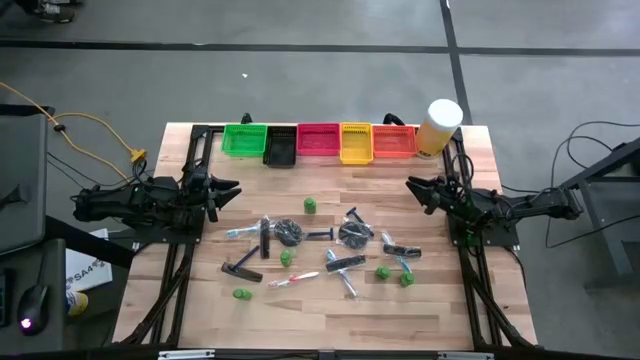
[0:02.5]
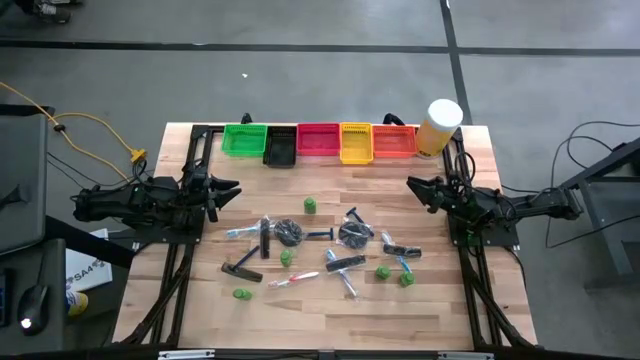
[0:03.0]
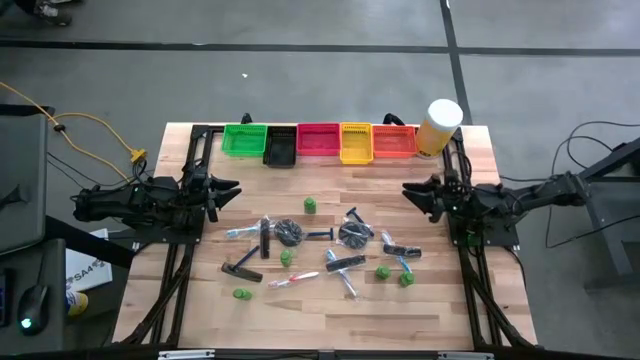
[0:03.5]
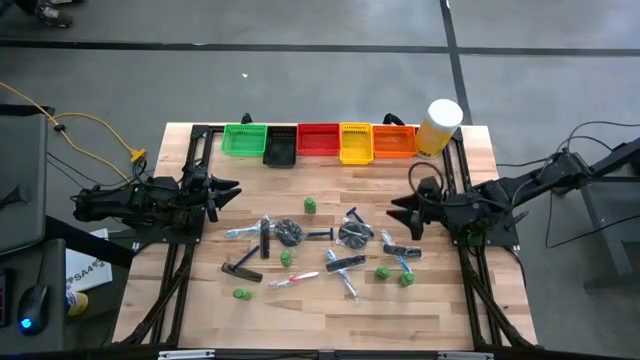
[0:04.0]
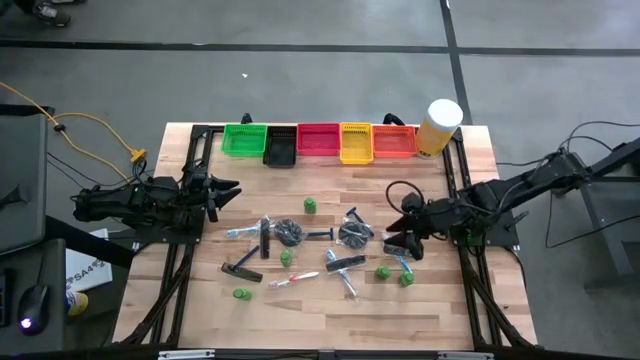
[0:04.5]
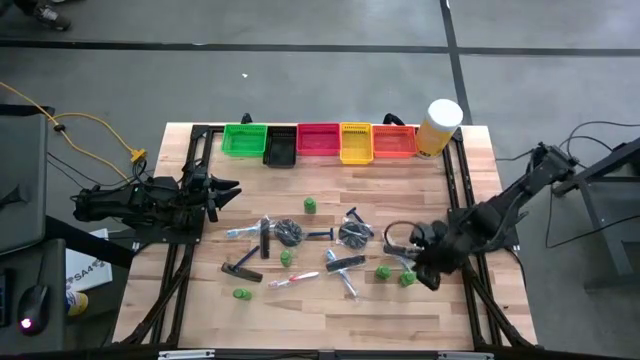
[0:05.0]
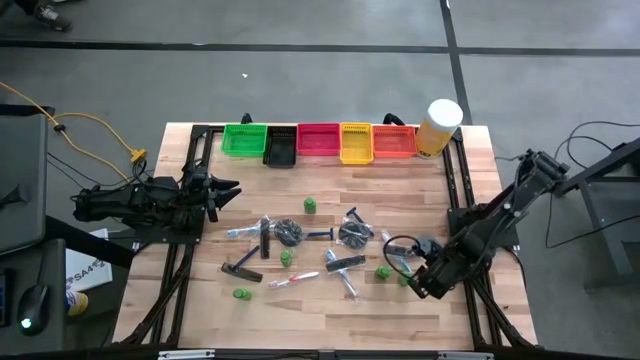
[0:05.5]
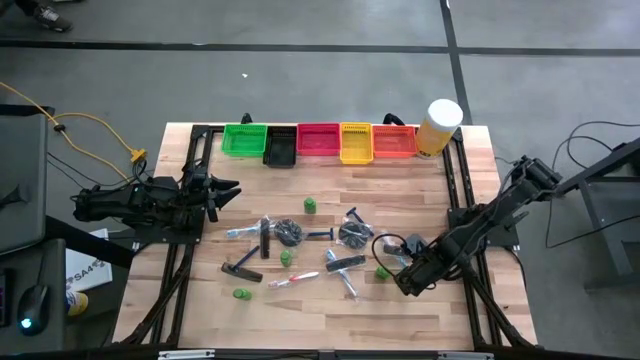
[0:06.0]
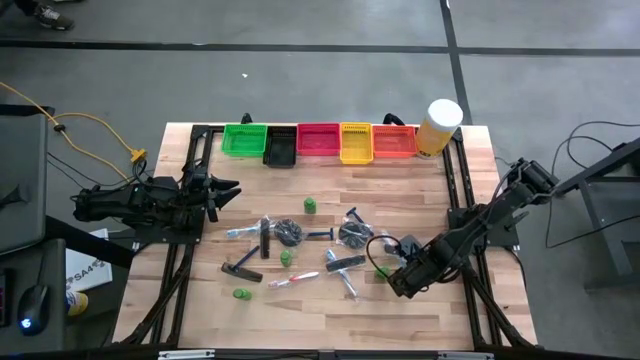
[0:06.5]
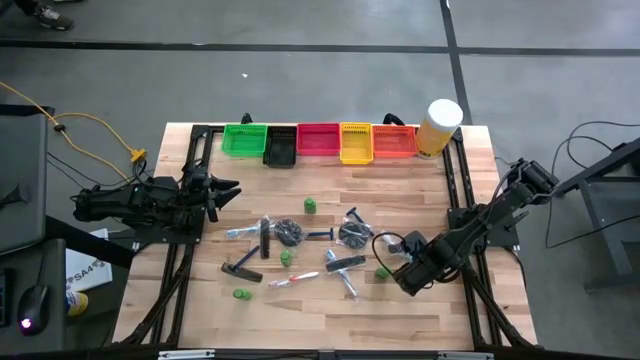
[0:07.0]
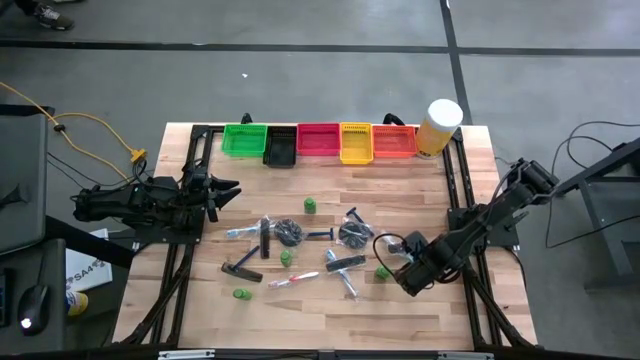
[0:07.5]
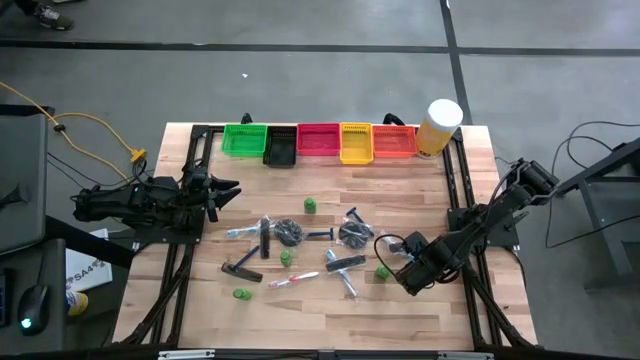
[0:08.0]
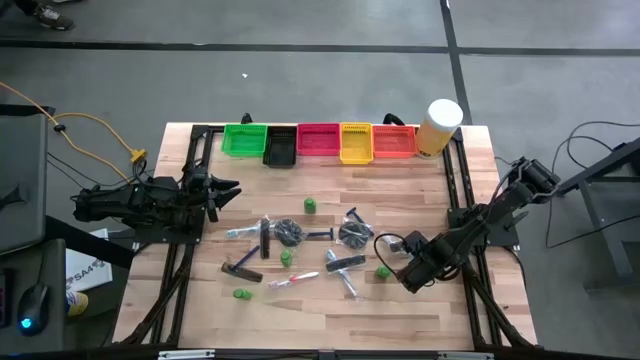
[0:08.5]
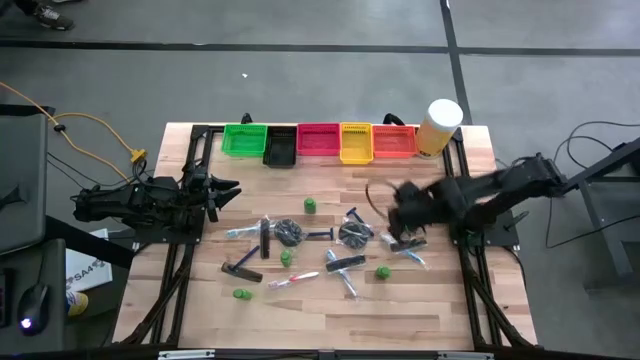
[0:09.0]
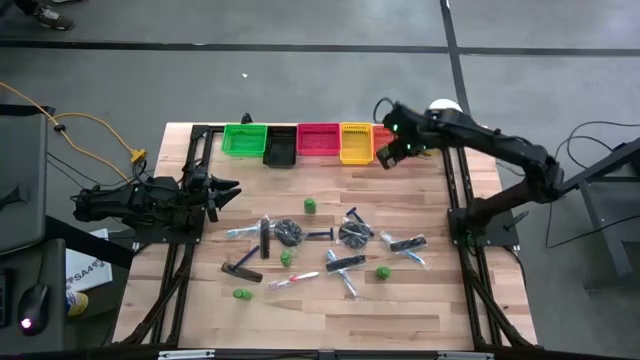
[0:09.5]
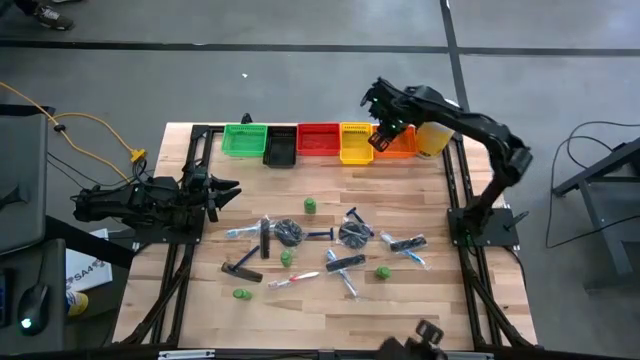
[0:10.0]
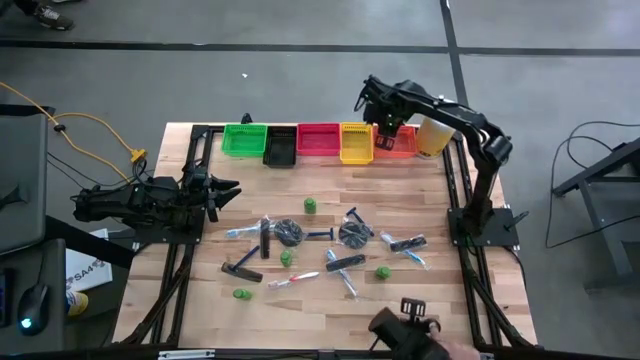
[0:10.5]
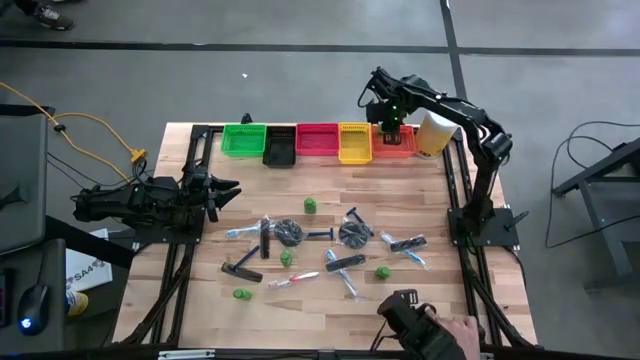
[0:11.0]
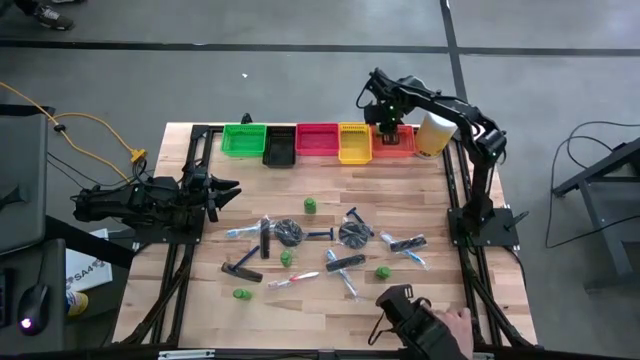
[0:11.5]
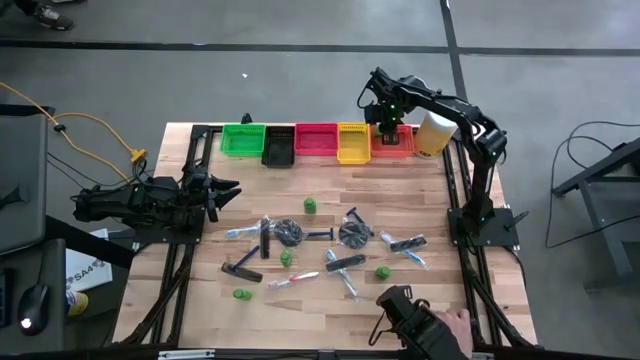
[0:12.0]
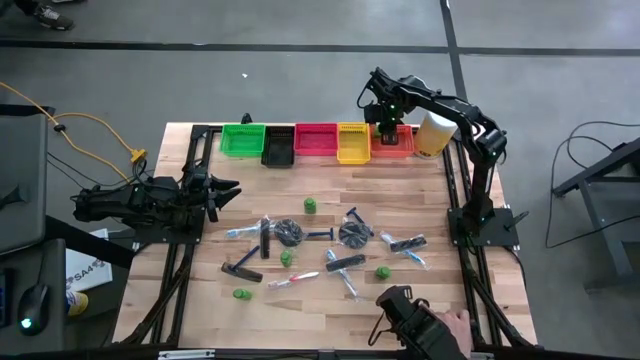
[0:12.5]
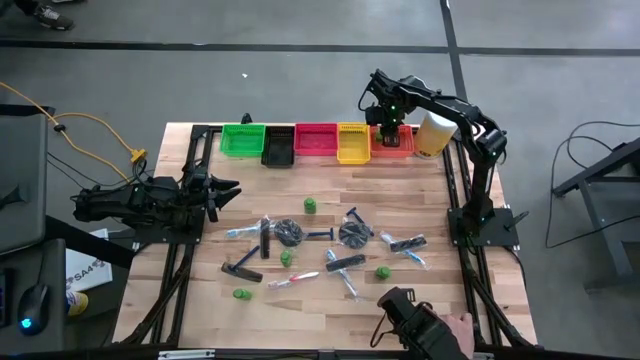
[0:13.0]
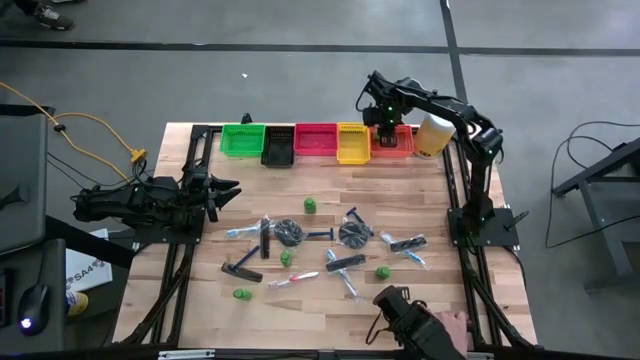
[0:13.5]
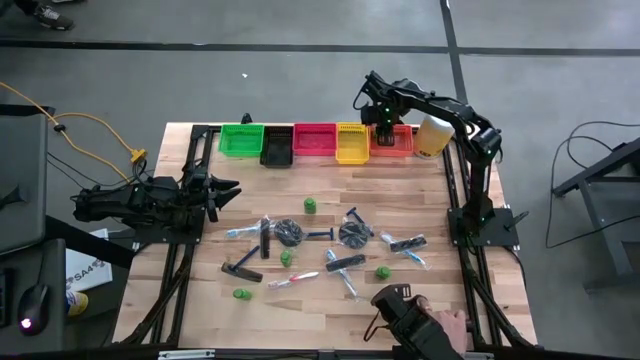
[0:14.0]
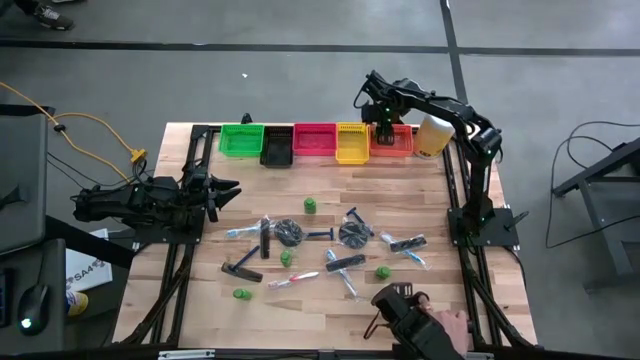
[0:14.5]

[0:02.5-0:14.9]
Task: Pick & Place Travel size toiletries
Put the green shampoo bottle into the orange basket

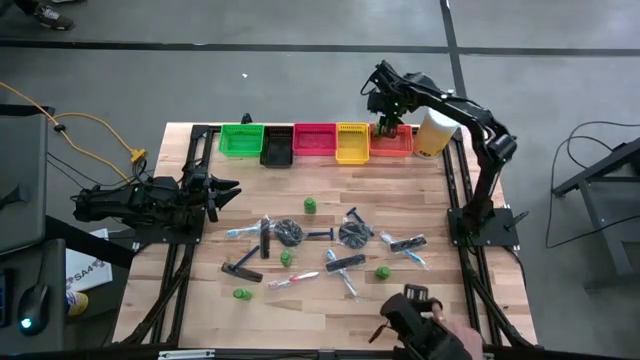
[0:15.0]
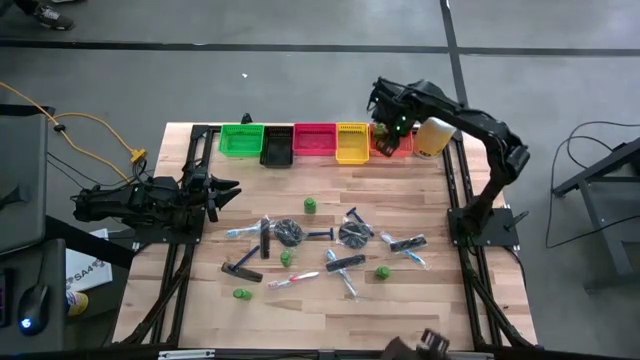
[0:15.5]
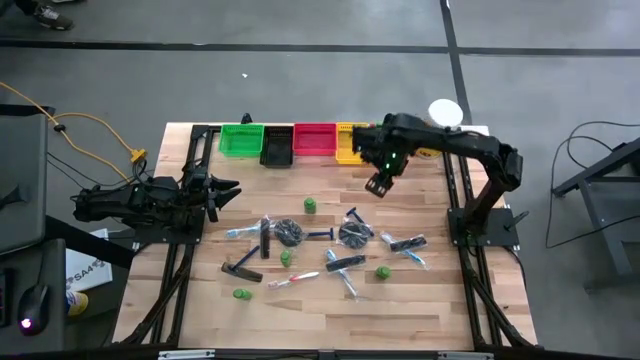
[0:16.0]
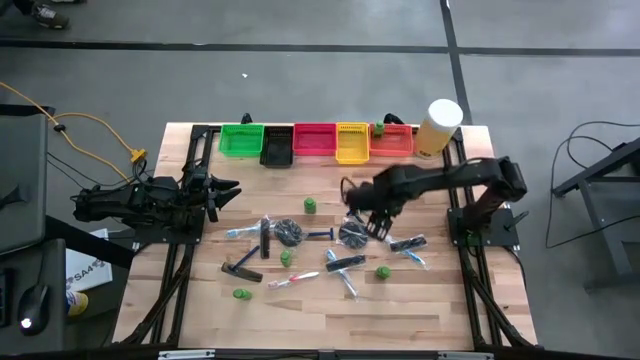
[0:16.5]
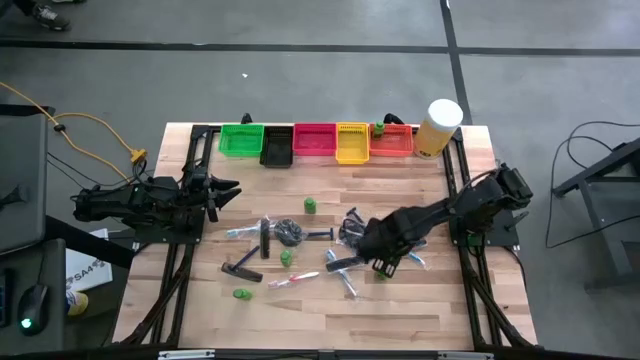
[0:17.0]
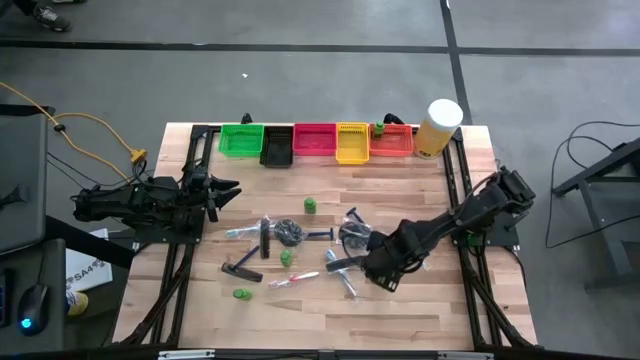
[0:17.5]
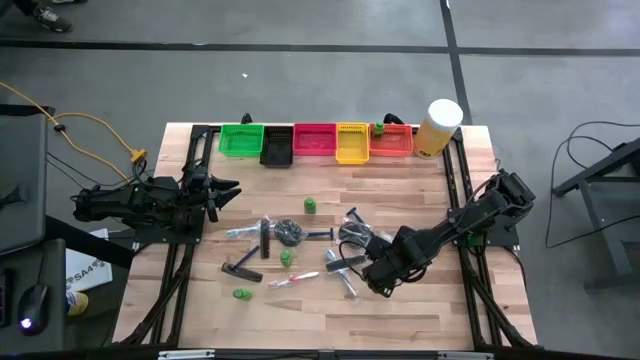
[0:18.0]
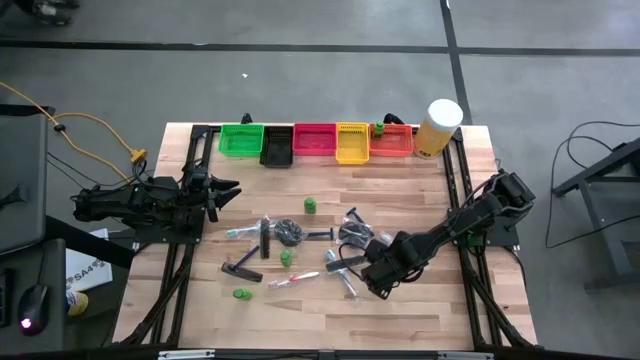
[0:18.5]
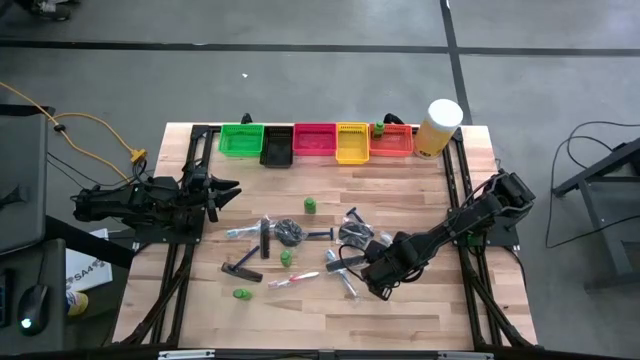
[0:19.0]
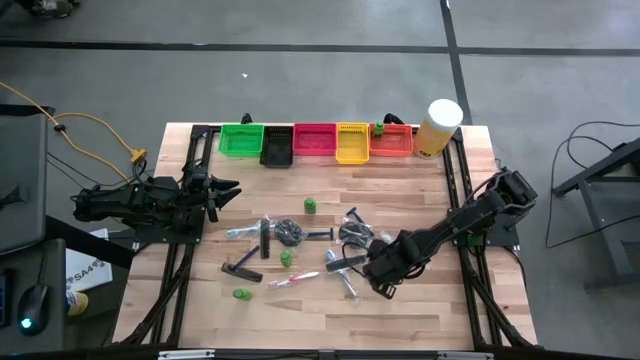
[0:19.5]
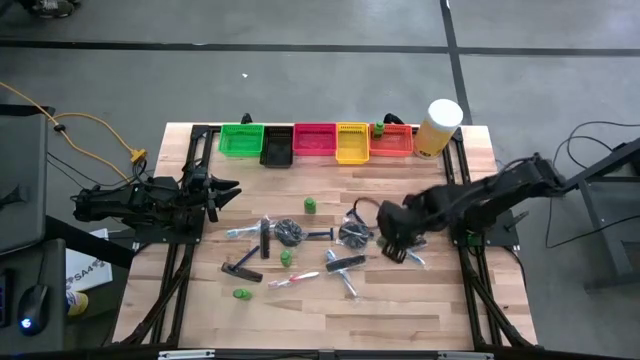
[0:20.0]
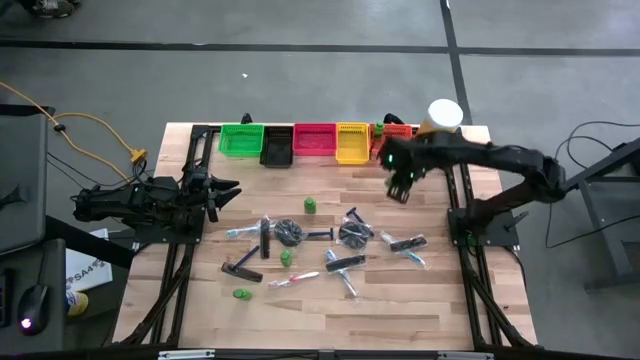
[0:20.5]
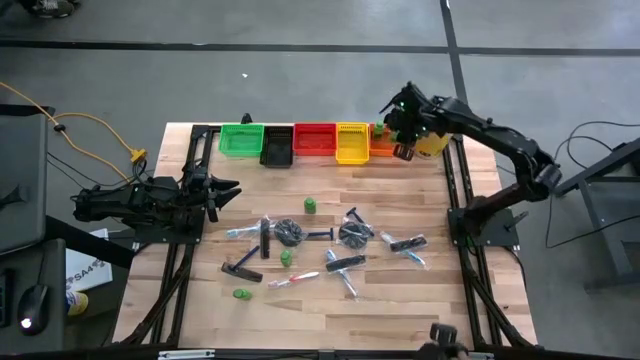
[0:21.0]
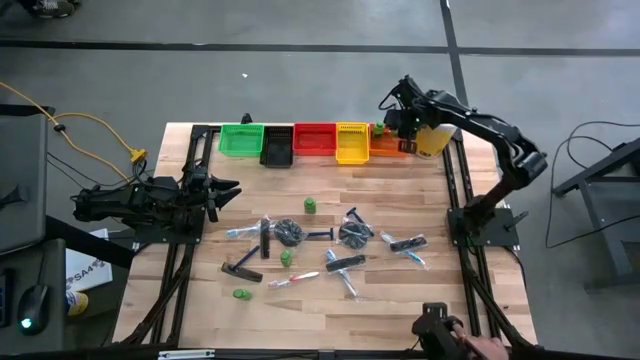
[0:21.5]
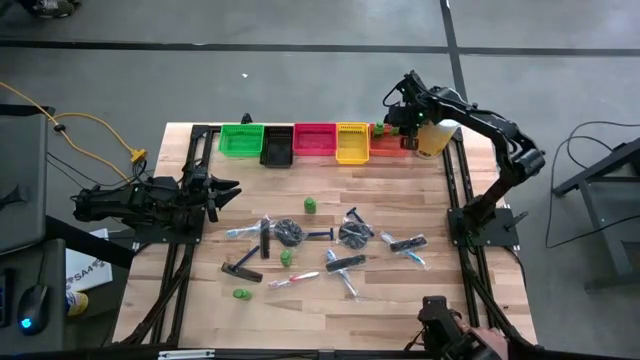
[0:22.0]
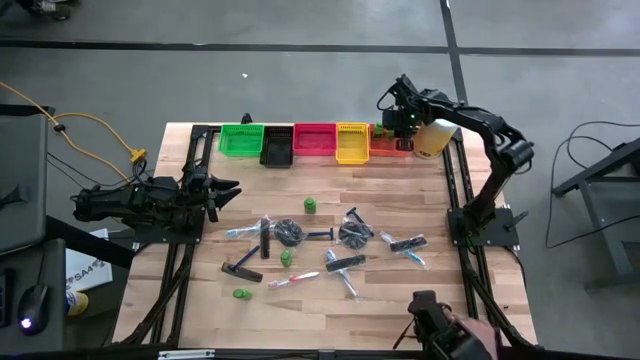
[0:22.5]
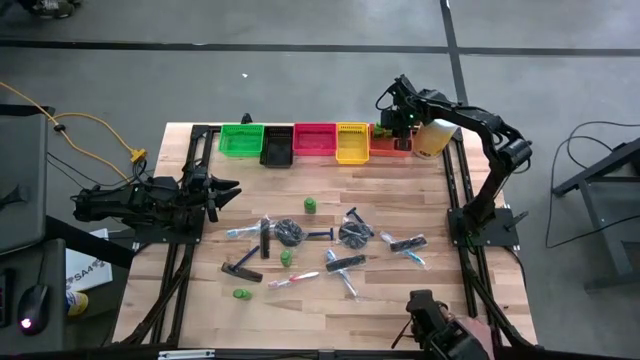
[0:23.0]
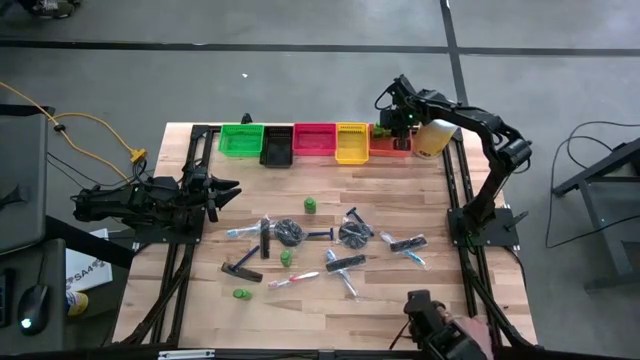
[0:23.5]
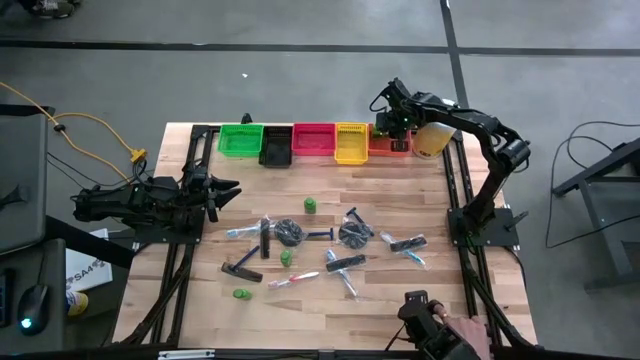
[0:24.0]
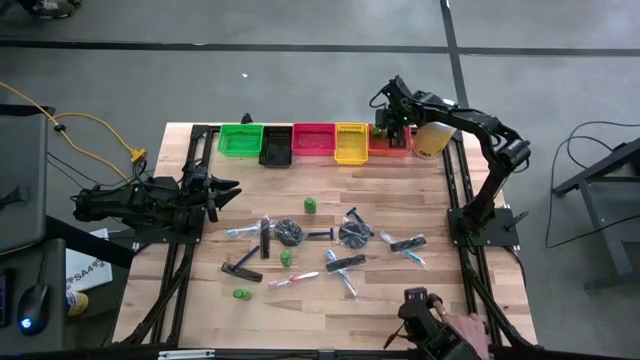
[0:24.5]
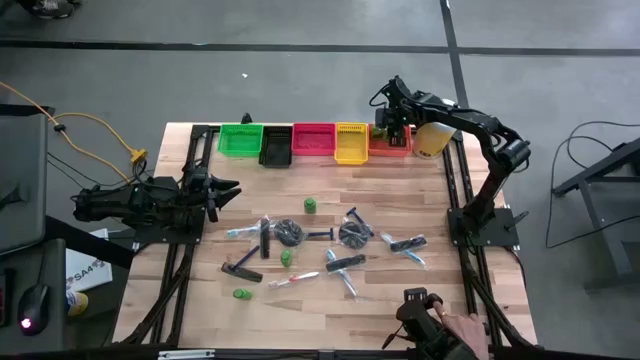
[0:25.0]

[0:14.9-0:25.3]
Put the green shampoo bottle into the orange basket
